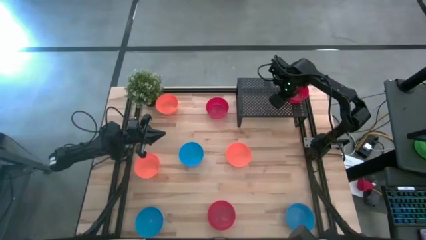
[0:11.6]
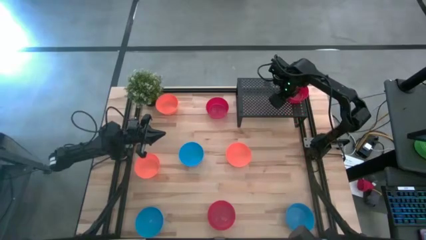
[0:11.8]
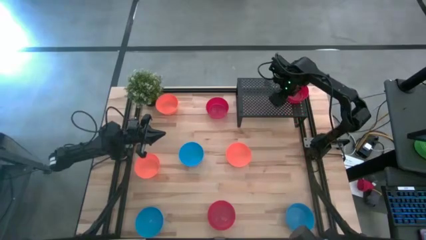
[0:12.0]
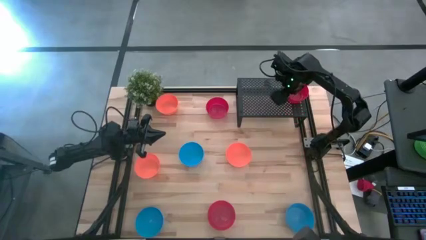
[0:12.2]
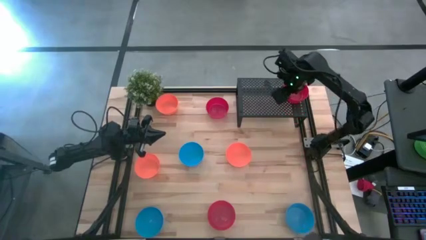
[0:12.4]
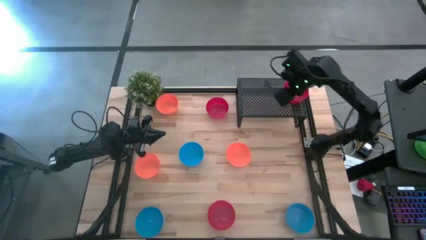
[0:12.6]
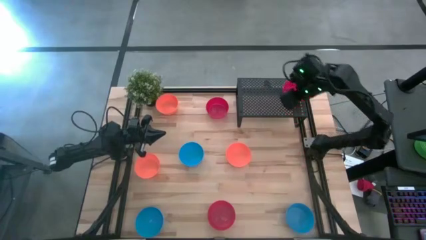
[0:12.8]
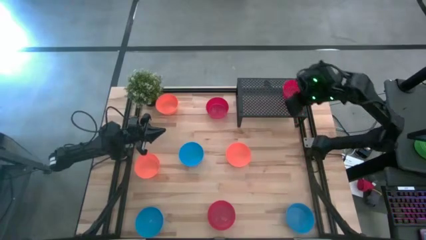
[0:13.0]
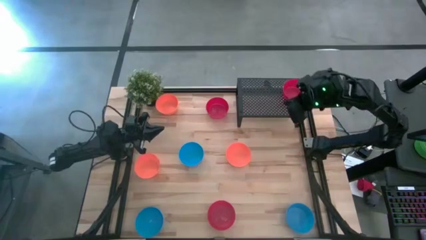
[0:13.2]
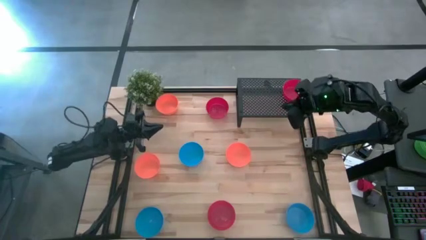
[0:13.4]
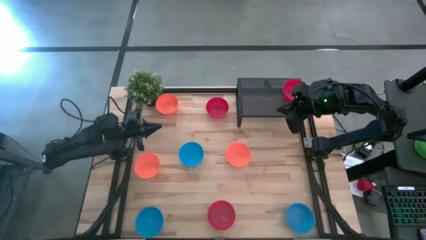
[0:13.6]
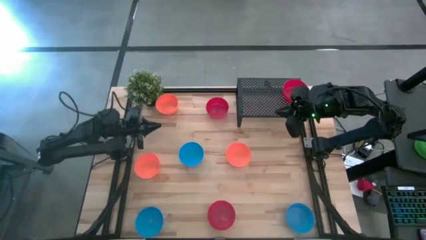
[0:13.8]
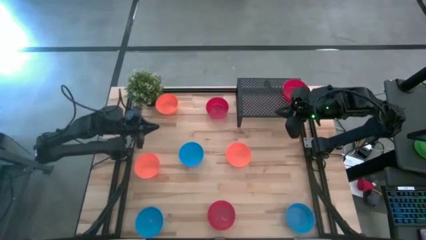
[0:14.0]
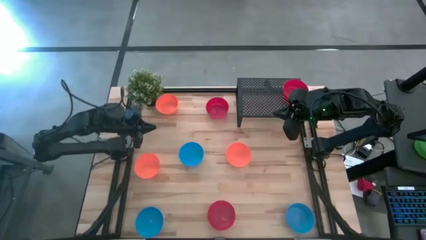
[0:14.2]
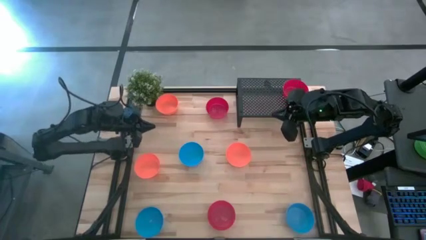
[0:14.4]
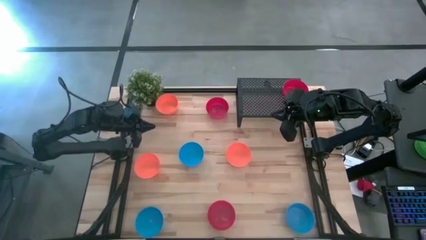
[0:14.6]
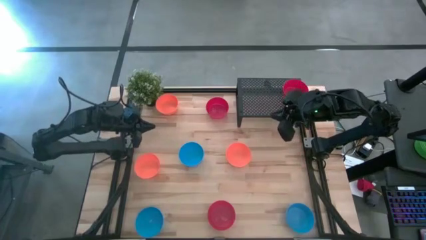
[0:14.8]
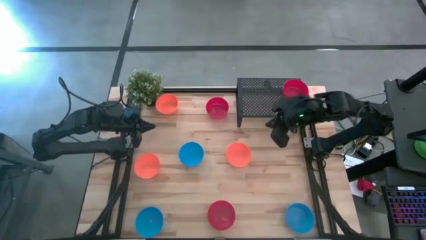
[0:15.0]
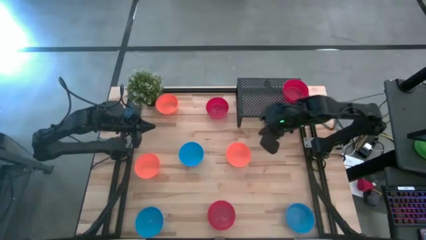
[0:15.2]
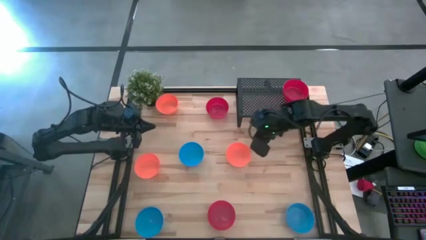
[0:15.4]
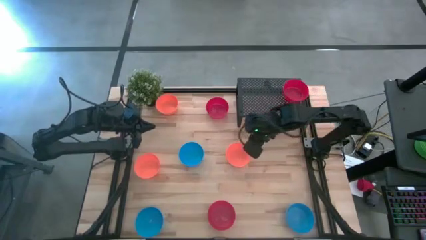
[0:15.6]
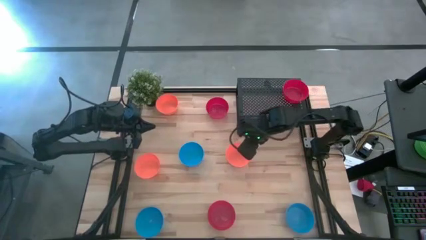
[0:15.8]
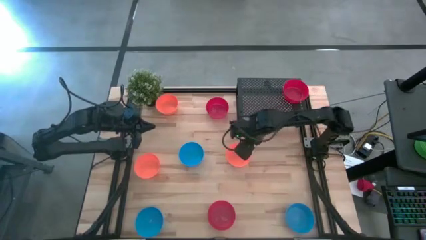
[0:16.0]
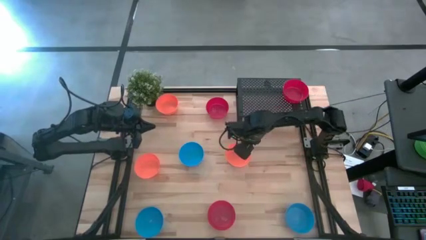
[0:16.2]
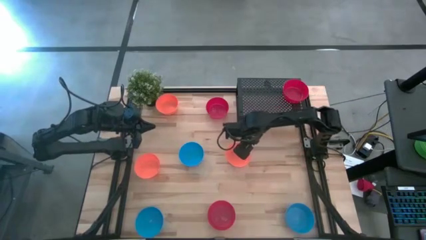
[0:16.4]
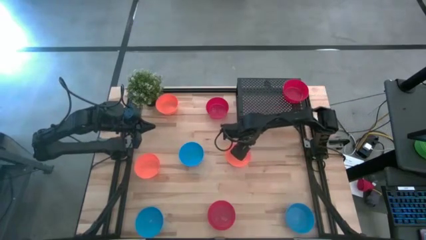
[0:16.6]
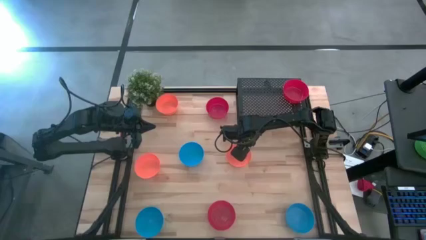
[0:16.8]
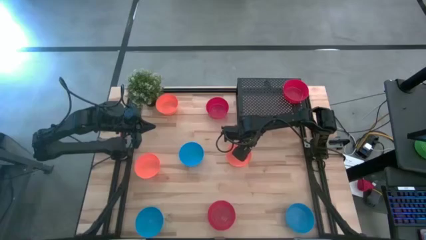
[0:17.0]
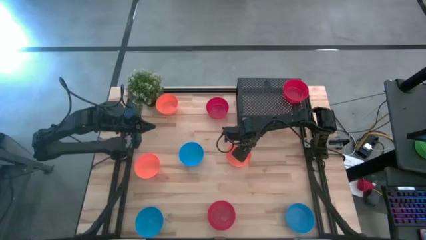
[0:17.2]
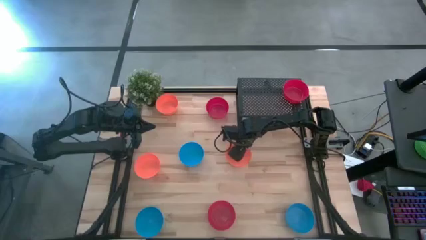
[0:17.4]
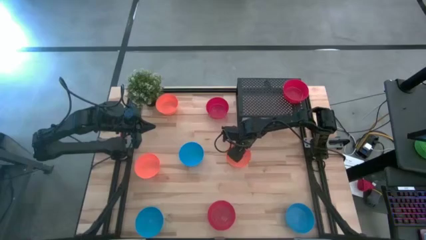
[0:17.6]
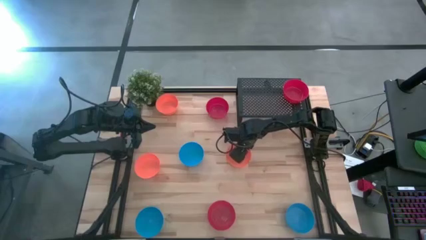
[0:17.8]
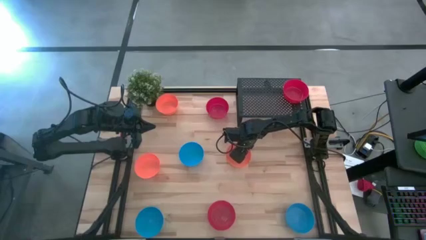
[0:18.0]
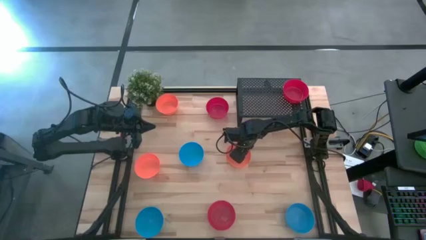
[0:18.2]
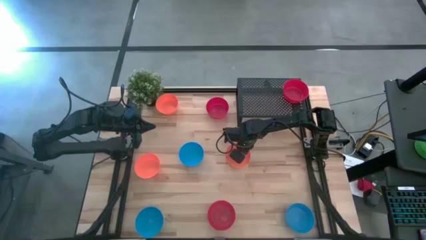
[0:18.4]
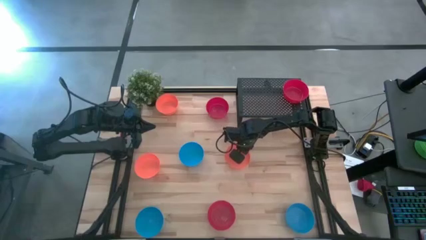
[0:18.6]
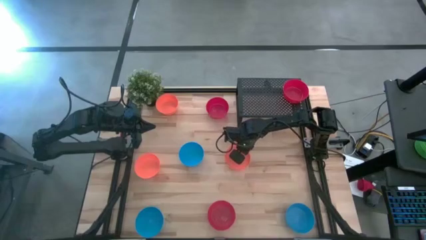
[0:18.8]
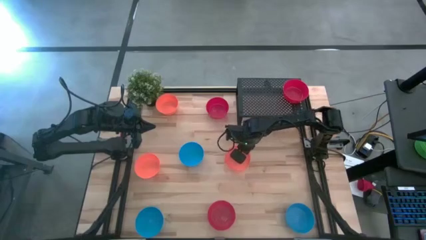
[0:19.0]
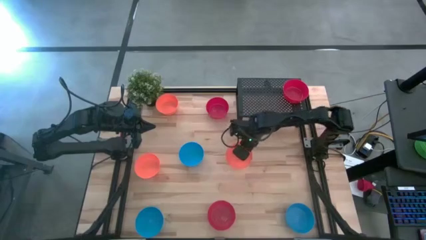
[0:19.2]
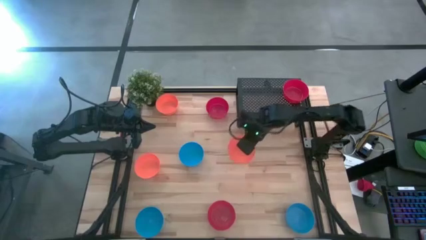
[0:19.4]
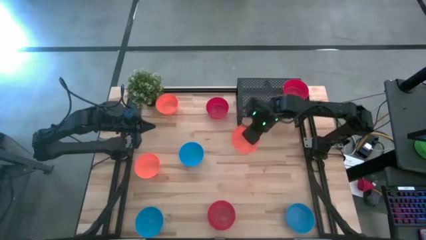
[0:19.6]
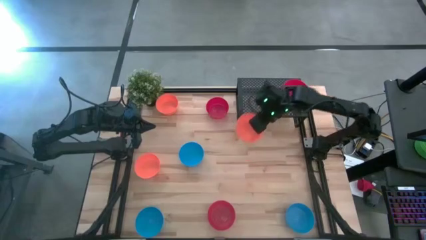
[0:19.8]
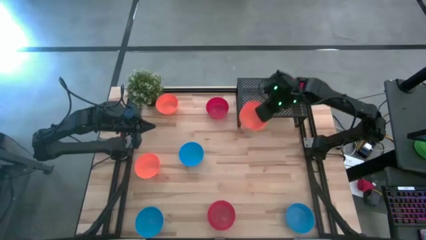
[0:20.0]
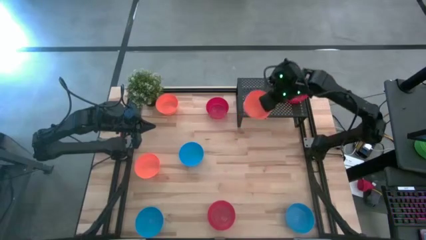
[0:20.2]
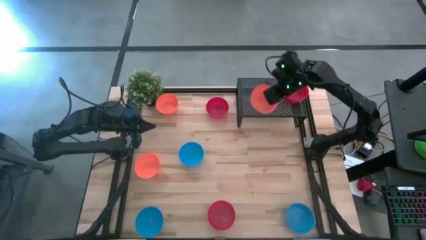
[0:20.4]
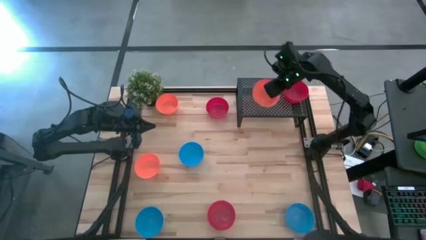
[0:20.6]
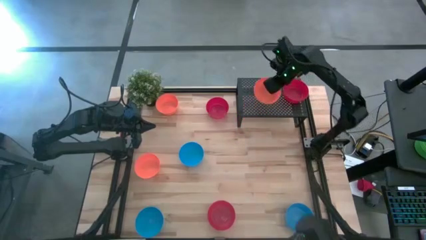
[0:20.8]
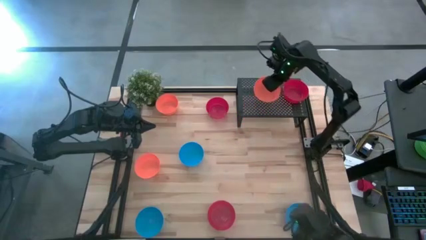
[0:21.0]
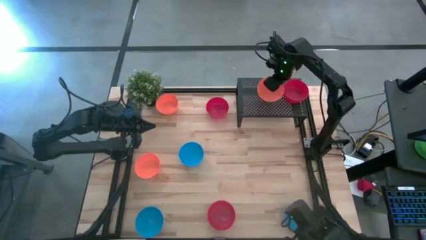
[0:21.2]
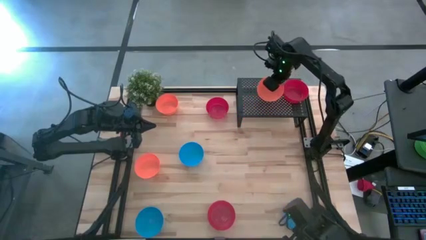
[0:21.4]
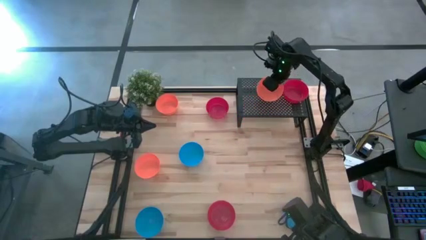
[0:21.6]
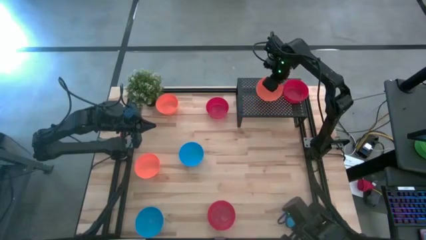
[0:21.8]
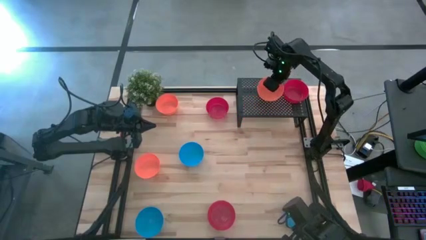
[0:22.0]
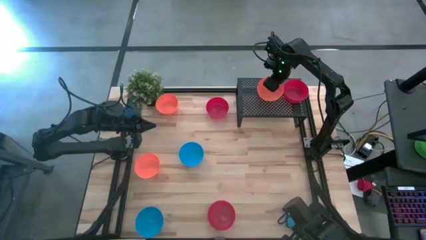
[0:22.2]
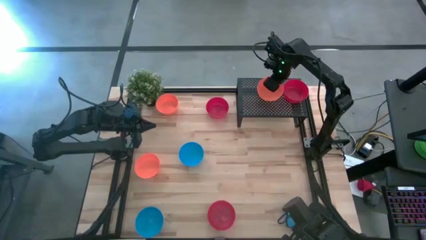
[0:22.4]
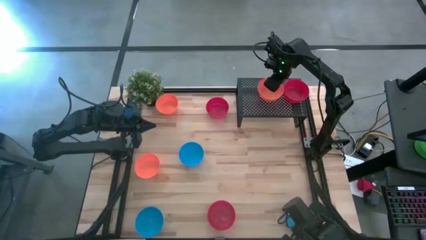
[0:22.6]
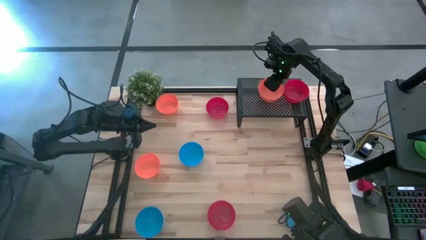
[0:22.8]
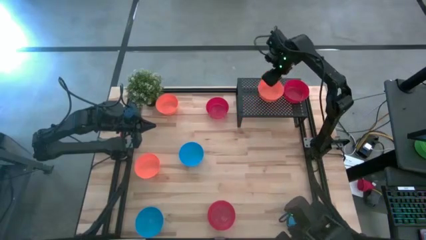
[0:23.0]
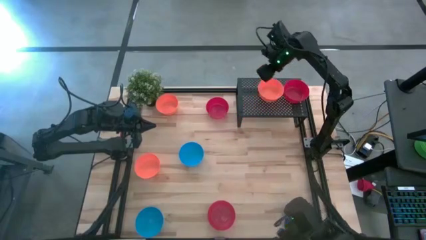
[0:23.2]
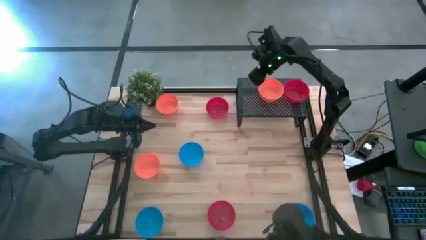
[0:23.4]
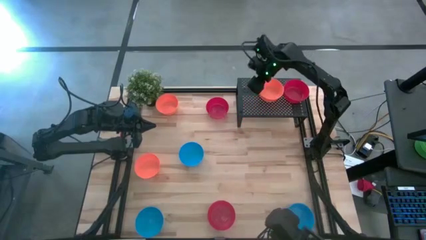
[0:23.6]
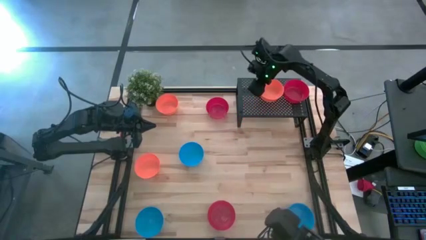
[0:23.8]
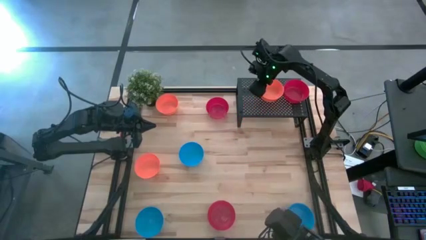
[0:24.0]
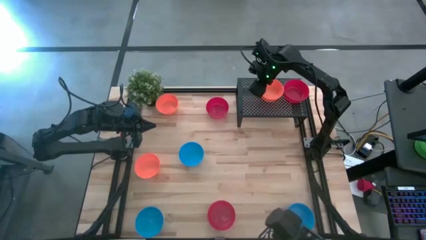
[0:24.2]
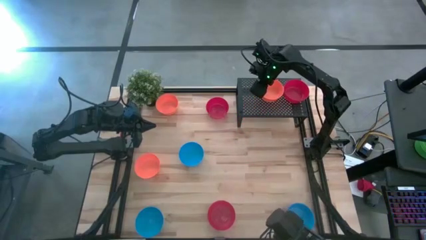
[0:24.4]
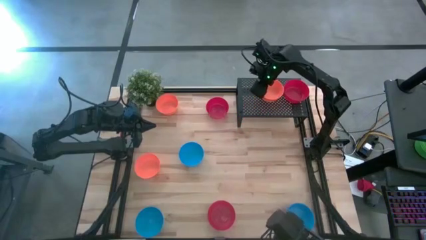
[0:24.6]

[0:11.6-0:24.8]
Task: Pick & Place Mini bowls
Put the middle orange bowl on the shelf
